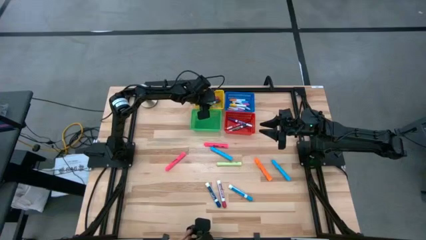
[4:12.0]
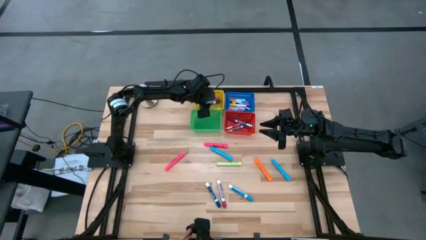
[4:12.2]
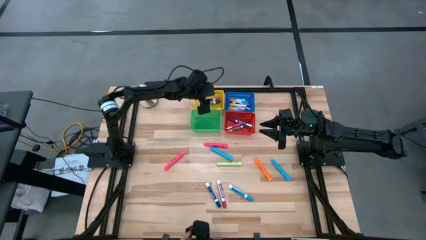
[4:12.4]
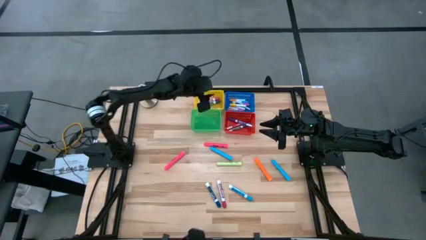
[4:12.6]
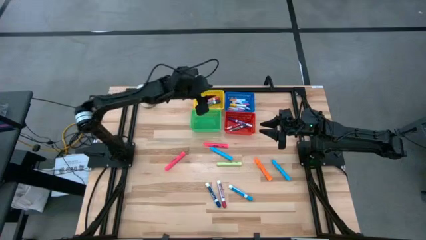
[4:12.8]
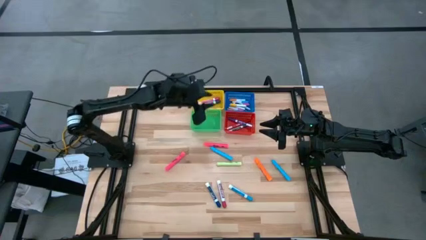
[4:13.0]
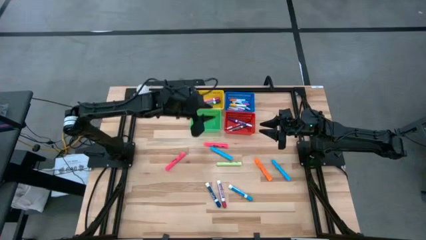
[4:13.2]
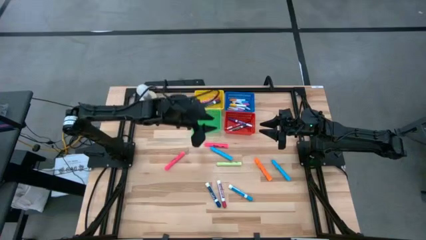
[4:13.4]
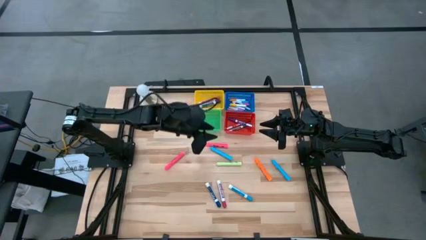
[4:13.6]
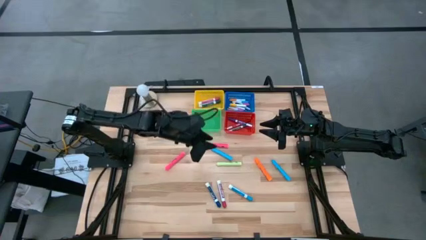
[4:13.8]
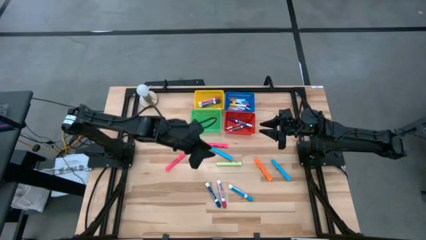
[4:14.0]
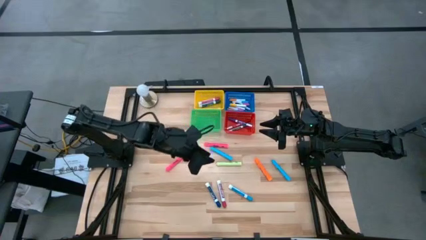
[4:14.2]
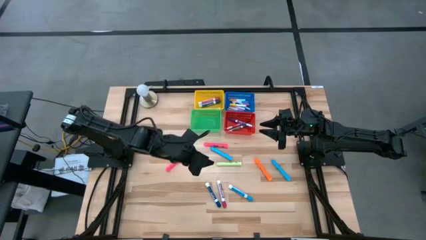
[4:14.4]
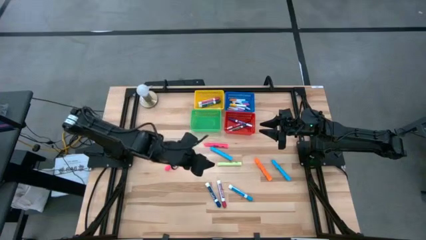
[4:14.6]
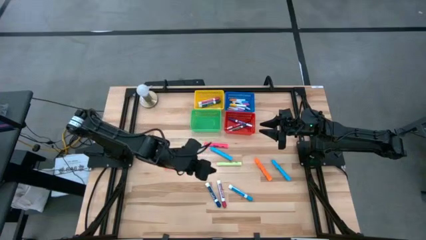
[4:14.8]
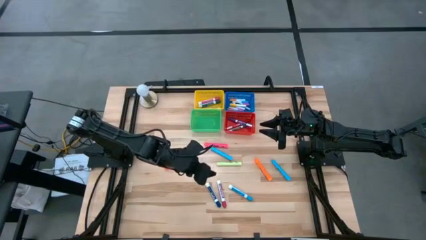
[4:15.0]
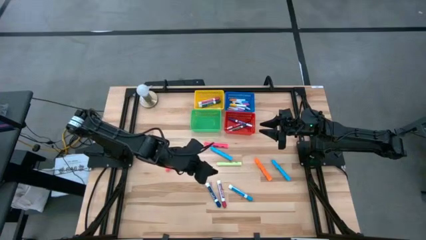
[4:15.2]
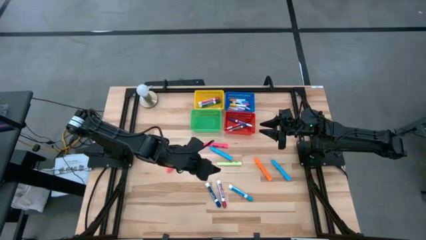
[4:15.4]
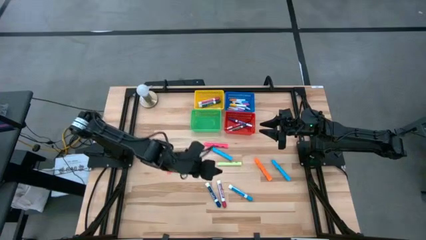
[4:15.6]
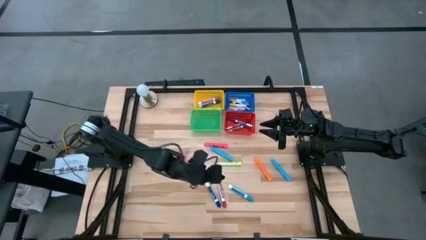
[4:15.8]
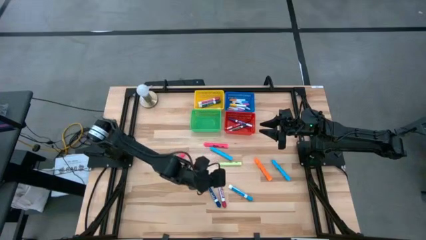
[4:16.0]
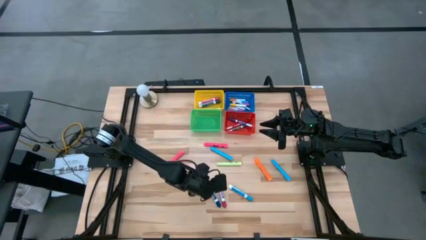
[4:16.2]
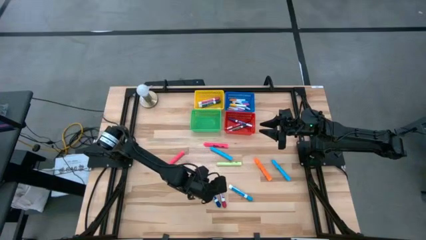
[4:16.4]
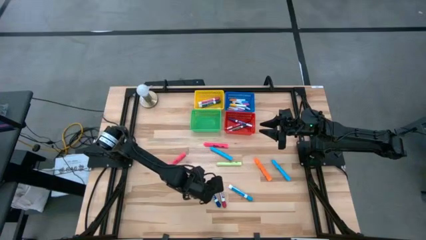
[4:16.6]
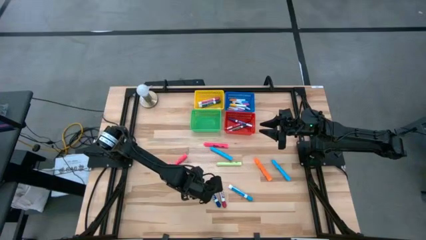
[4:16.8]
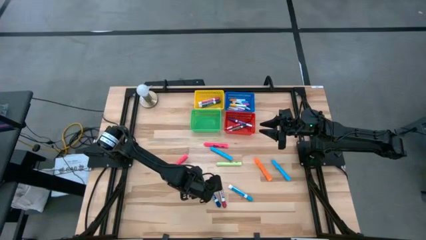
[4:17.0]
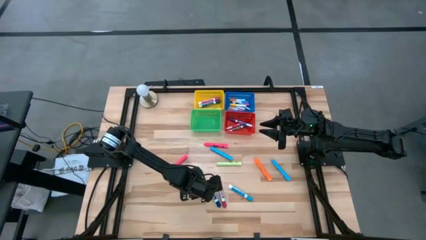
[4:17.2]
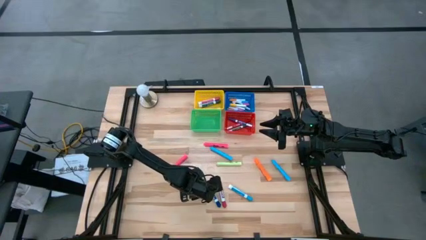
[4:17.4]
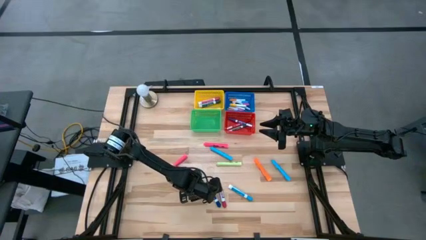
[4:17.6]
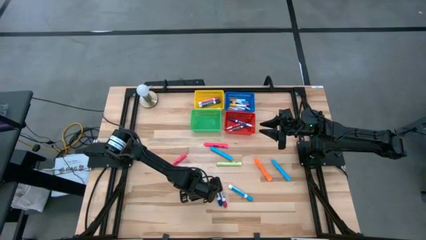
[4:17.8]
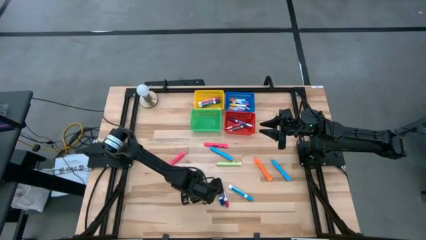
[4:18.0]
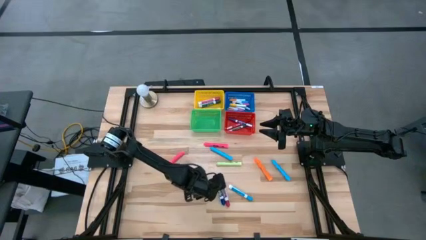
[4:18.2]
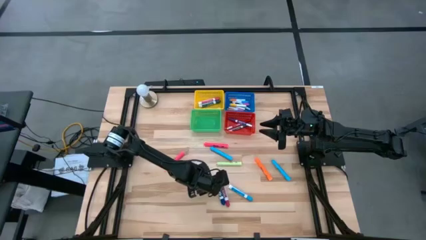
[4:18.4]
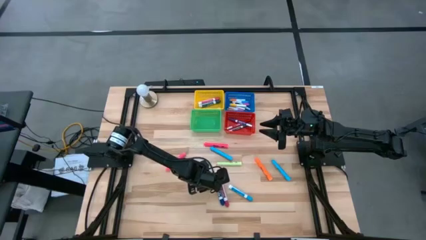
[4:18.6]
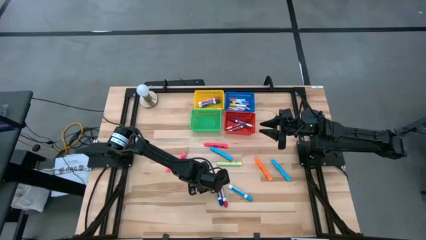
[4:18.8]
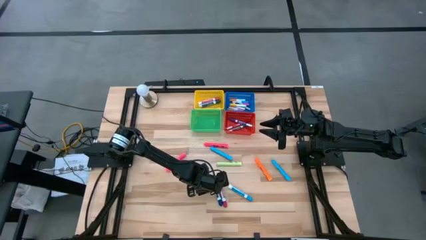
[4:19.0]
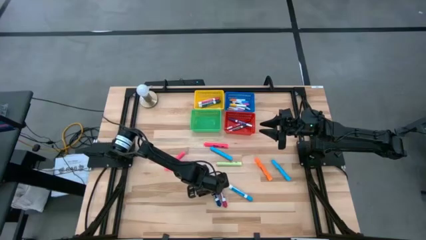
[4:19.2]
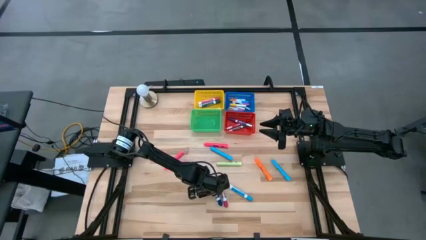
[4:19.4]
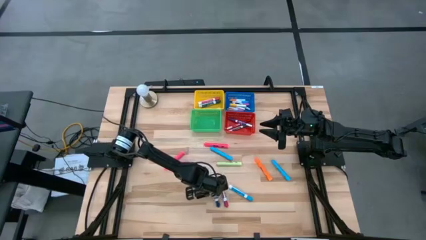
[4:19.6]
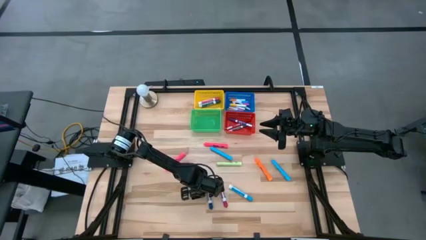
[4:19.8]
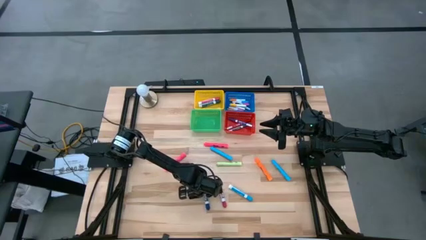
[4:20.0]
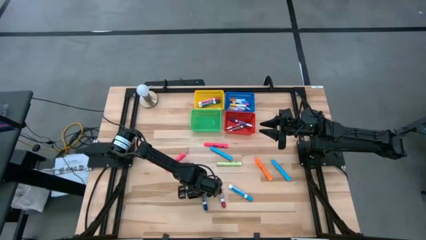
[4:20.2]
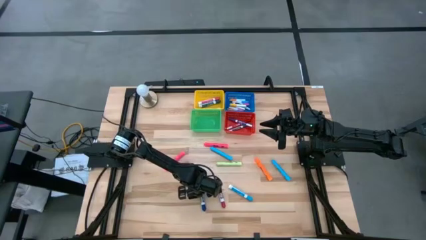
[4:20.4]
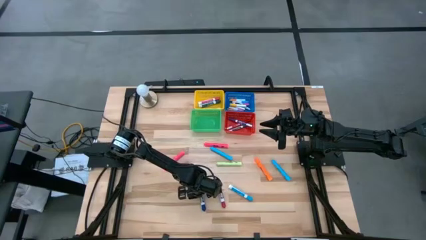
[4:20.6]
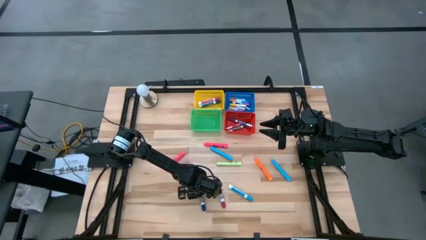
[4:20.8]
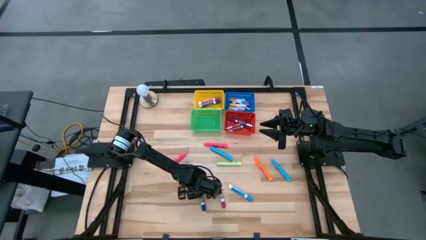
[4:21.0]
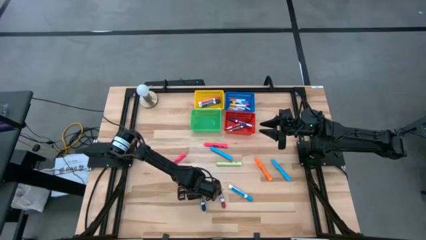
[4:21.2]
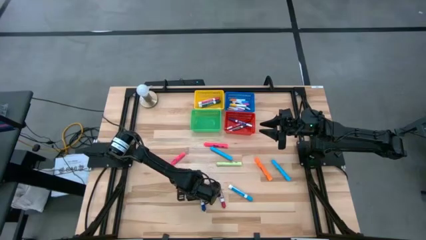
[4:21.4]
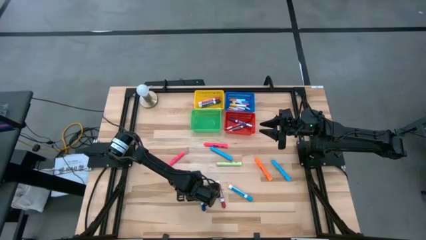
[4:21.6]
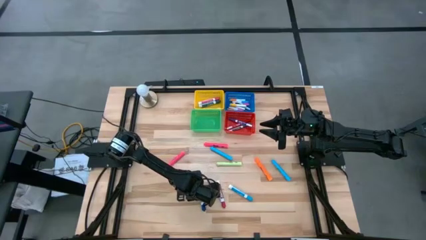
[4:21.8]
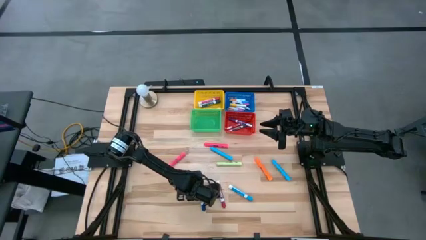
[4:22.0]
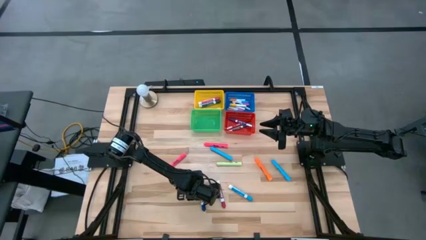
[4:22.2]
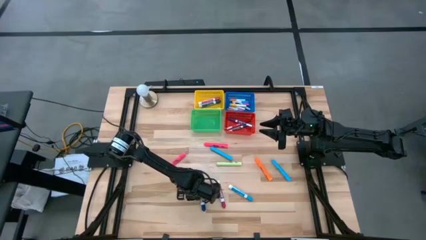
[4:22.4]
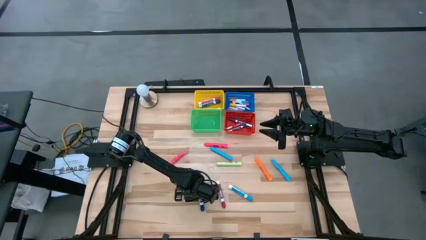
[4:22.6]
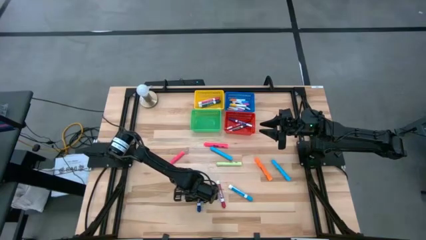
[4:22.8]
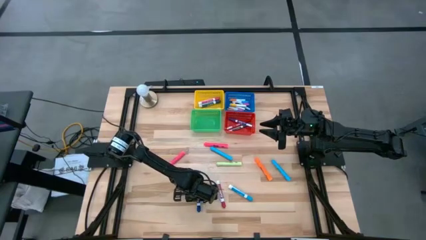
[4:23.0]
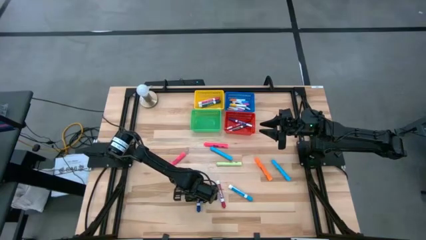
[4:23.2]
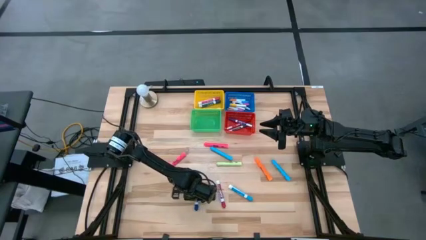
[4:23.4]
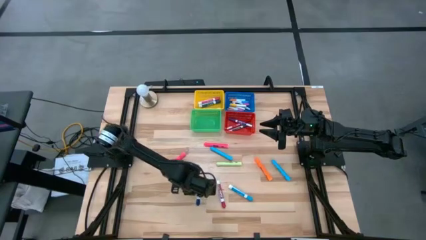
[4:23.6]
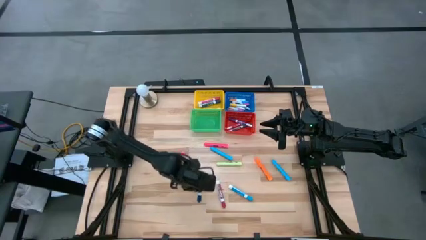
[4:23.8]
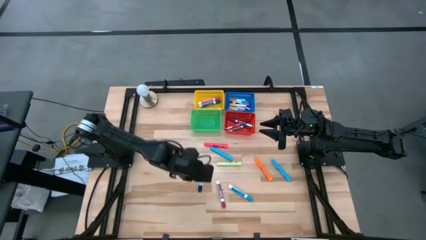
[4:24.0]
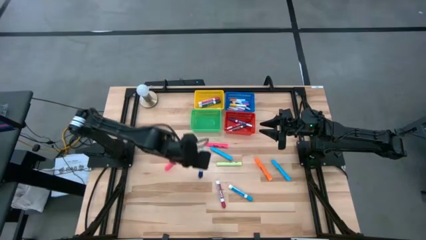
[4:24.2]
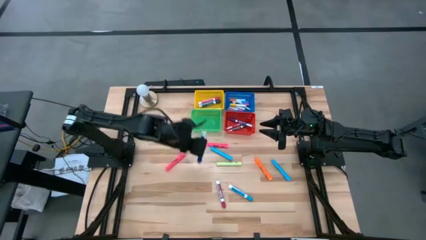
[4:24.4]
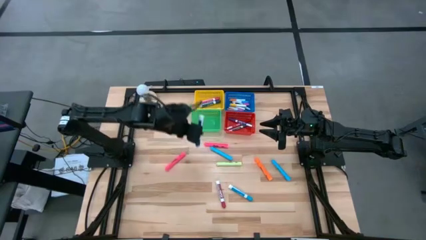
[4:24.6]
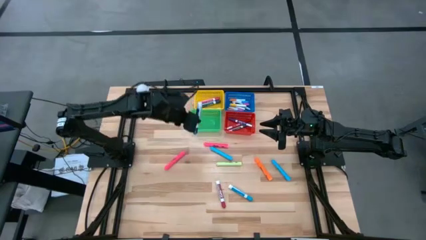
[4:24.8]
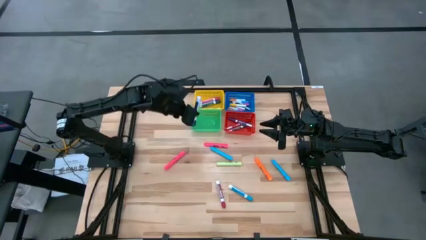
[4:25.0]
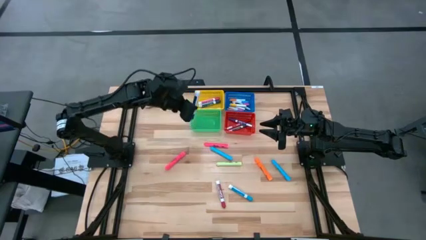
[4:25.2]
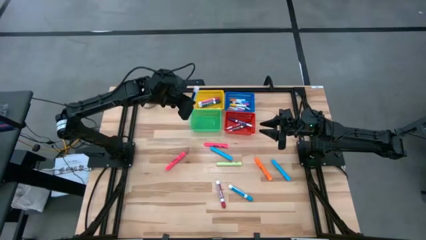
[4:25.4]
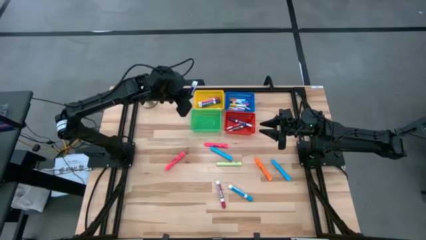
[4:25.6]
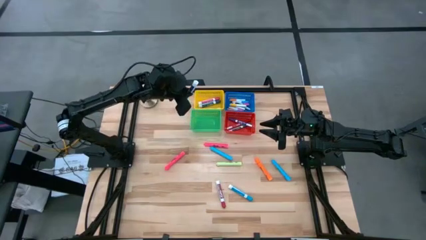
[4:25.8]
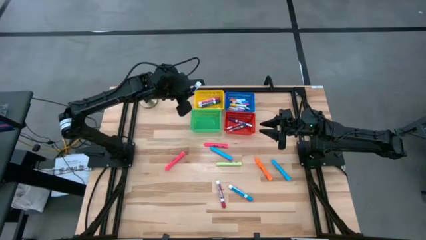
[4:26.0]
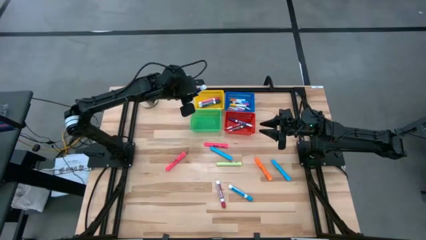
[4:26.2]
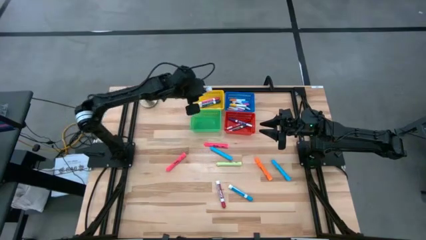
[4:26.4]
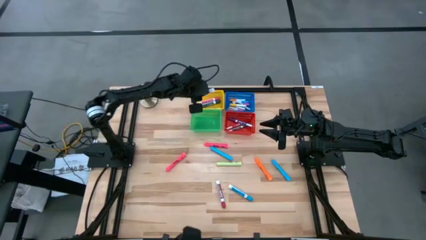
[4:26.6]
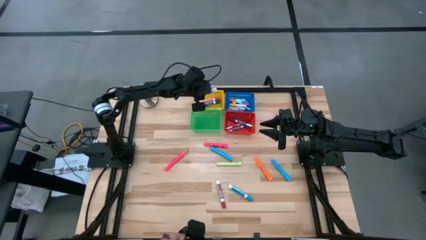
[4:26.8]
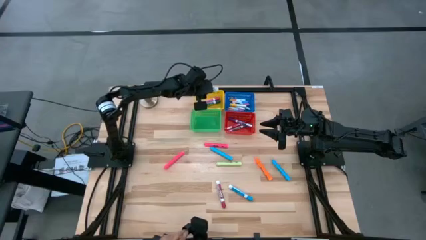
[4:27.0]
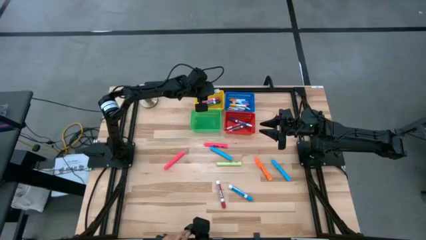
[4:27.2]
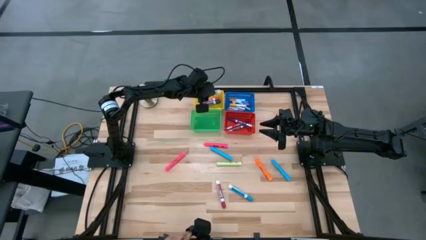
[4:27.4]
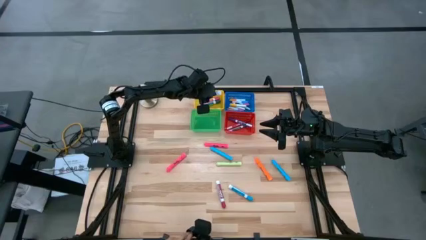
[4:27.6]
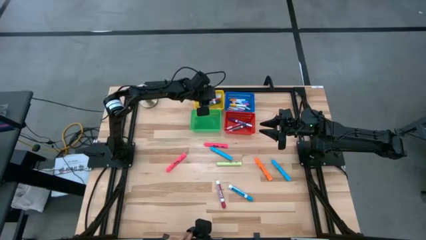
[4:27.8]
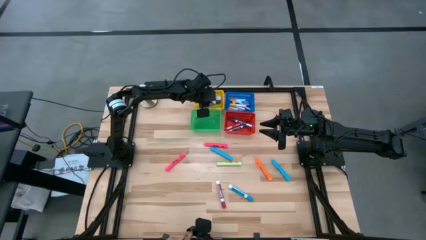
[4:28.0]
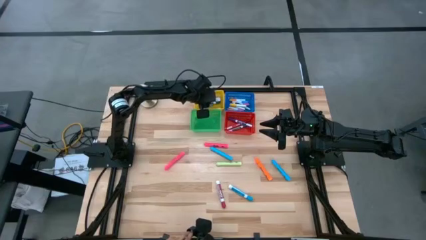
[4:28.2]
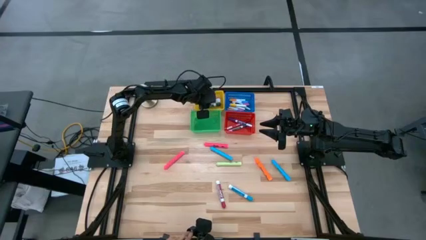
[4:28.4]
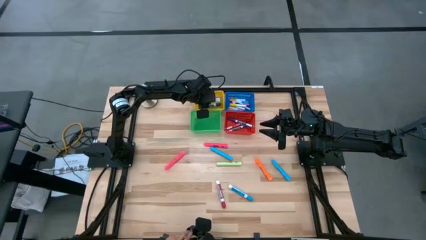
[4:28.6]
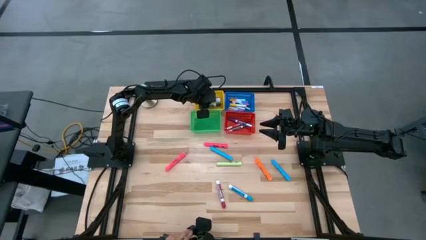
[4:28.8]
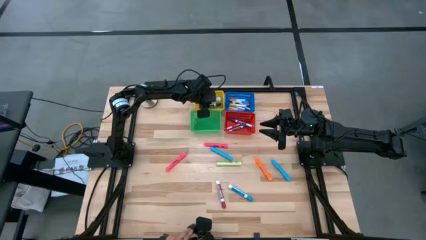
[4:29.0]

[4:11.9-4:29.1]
Task: Pick & Place Markers
Put the large dark blue marker pen into the yellow bin
